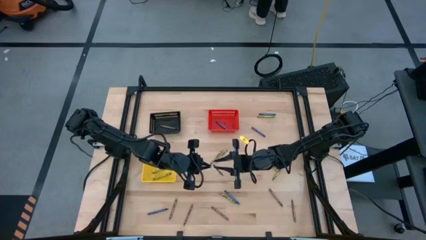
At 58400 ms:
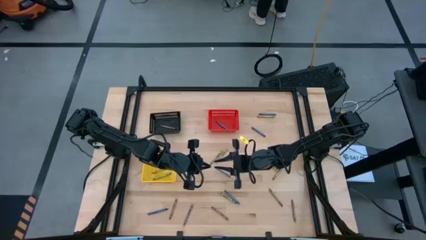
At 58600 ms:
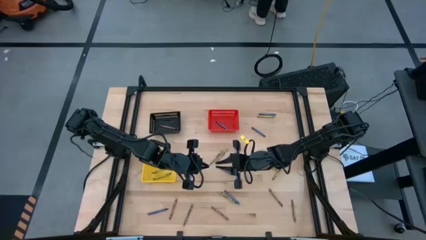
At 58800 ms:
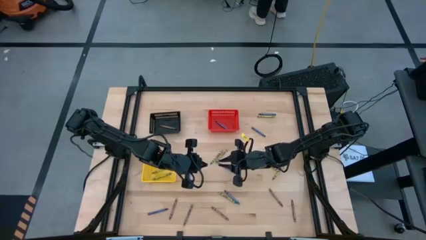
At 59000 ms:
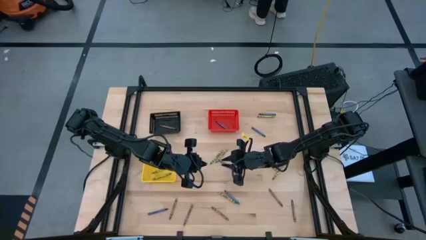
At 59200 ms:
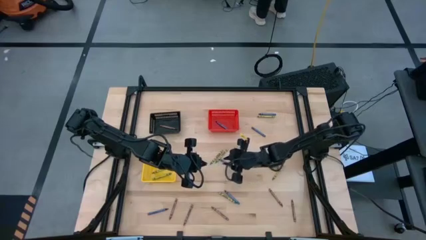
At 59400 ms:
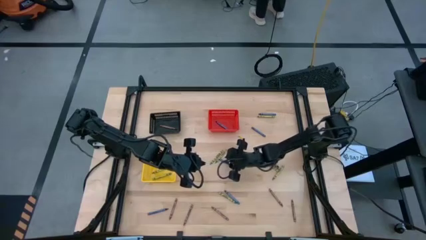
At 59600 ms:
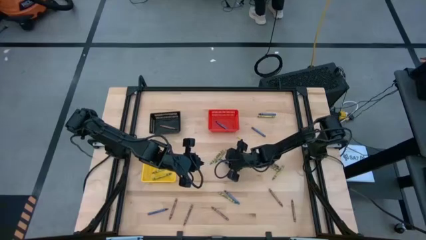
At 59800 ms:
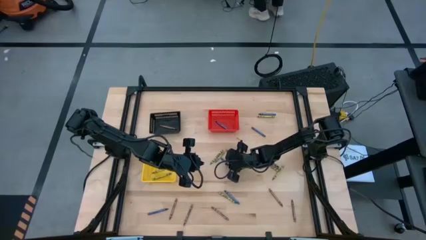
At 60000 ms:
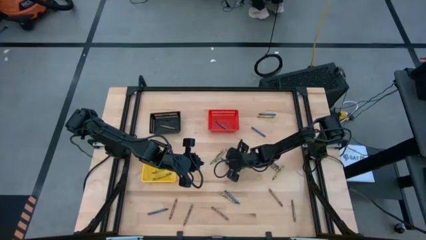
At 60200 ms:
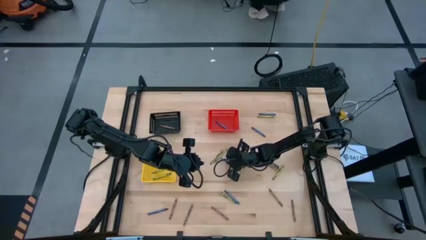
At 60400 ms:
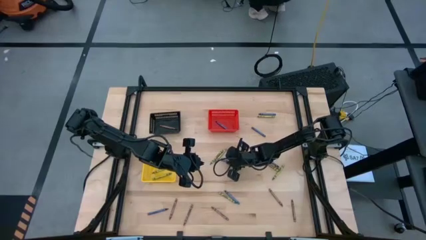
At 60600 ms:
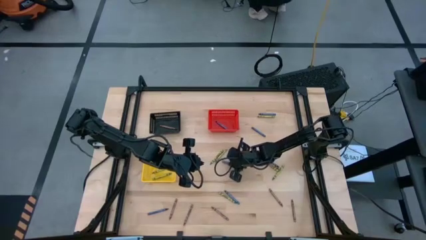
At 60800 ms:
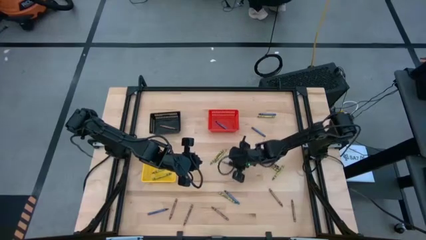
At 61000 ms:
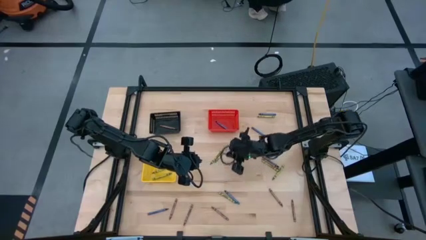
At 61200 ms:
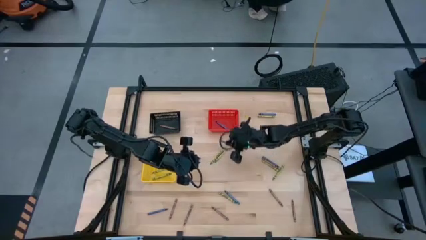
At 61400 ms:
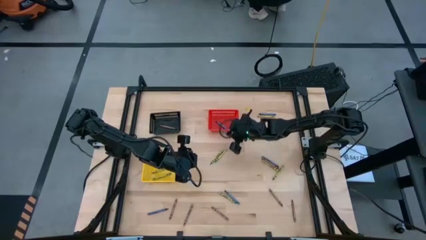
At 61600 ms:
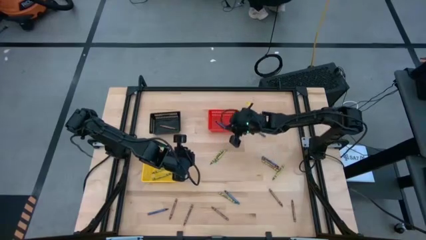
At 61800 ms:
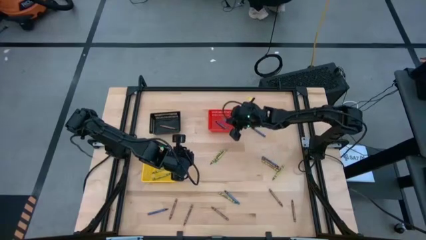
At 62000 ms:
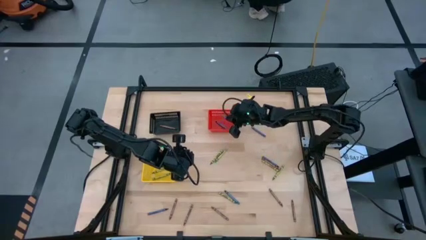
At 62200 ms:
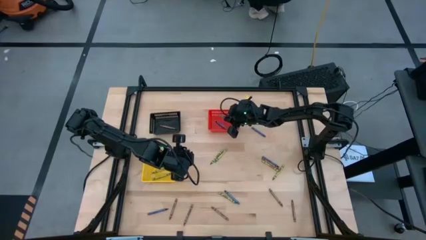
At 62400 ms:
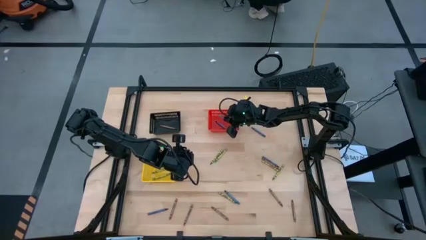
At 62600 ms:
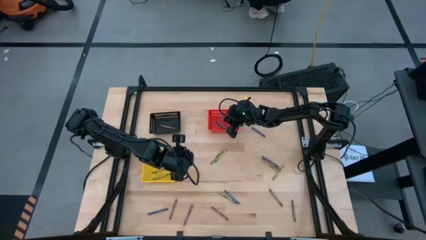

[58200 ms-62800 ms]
Task: Sort crayons
Put the blue crayon into the red bin

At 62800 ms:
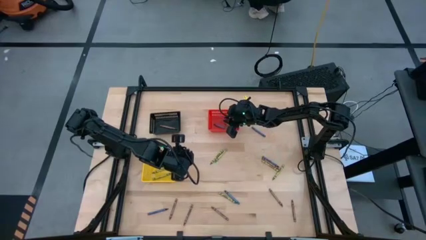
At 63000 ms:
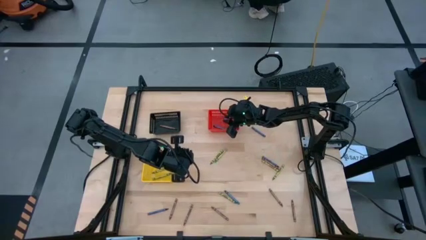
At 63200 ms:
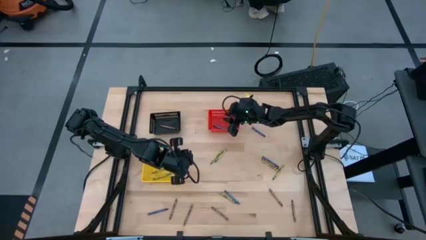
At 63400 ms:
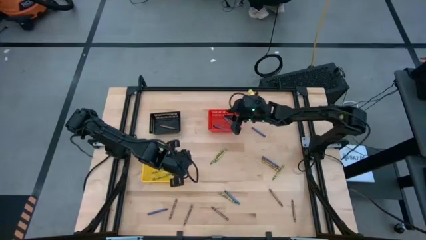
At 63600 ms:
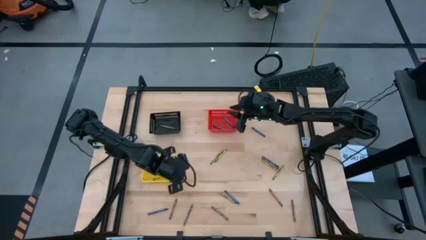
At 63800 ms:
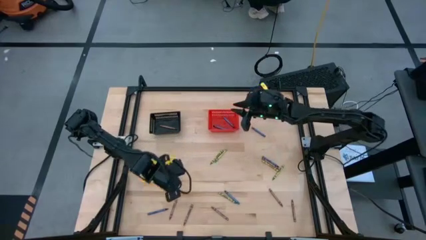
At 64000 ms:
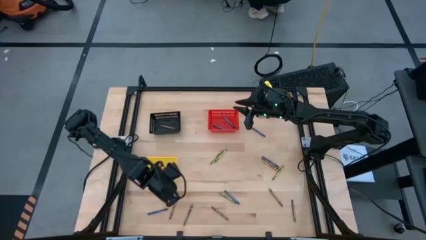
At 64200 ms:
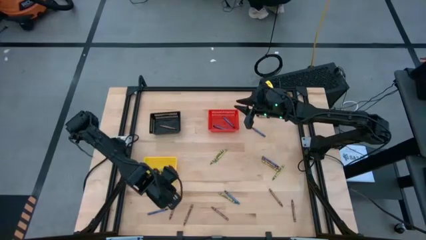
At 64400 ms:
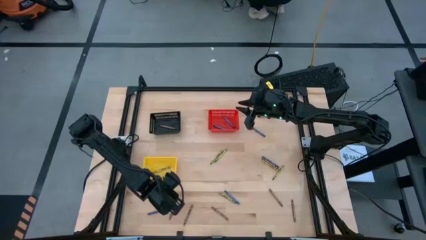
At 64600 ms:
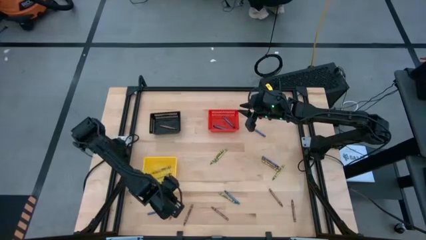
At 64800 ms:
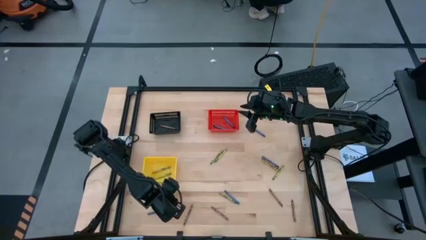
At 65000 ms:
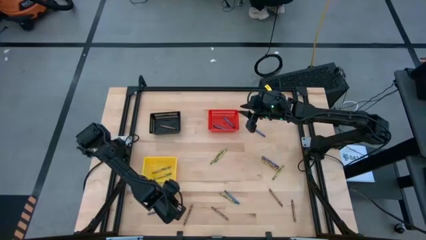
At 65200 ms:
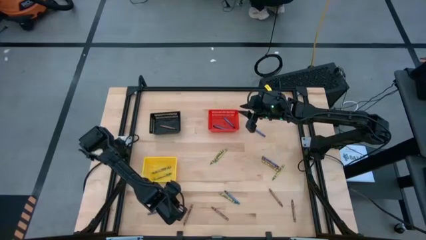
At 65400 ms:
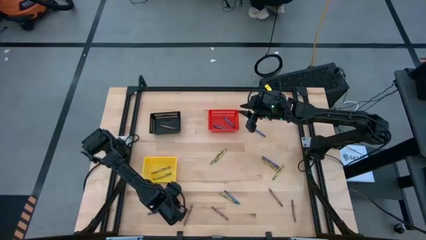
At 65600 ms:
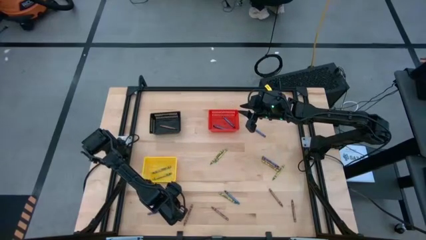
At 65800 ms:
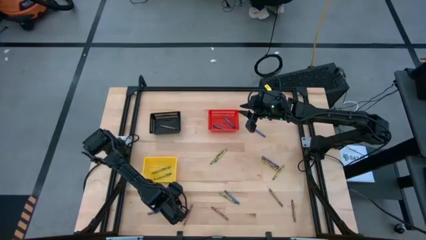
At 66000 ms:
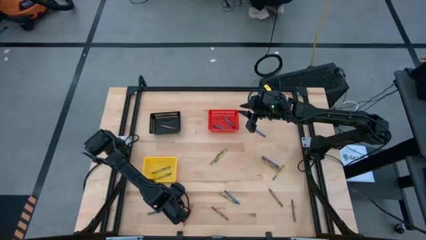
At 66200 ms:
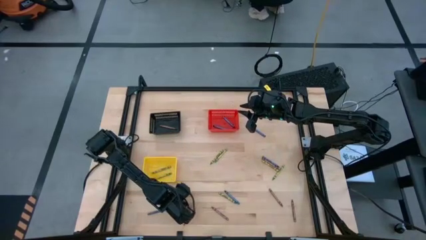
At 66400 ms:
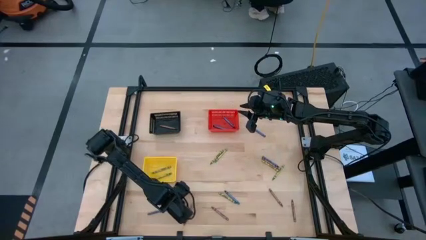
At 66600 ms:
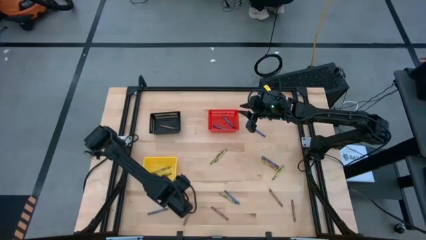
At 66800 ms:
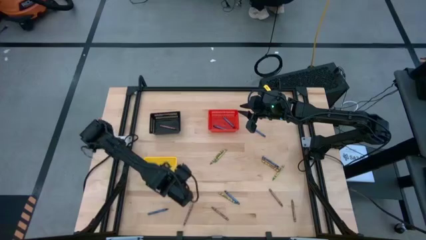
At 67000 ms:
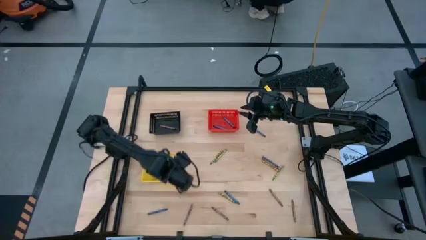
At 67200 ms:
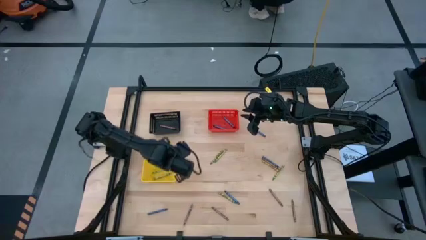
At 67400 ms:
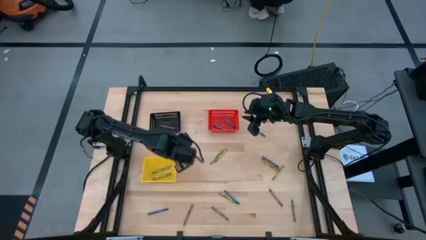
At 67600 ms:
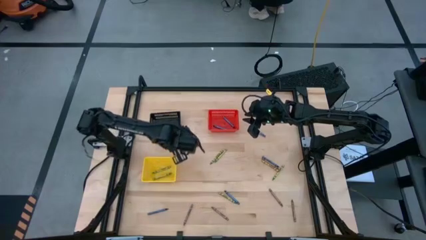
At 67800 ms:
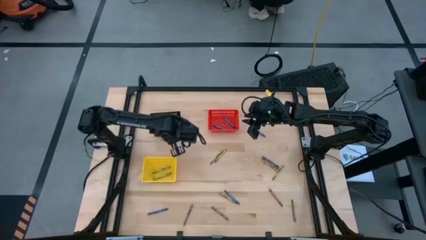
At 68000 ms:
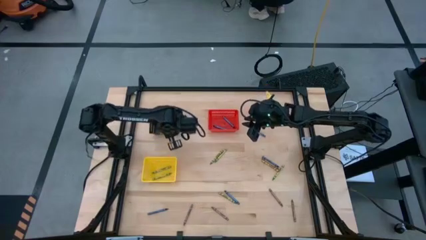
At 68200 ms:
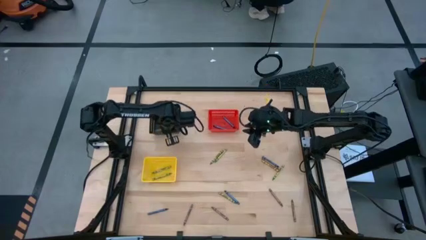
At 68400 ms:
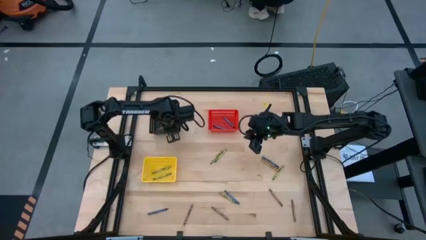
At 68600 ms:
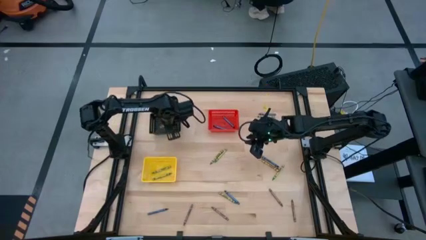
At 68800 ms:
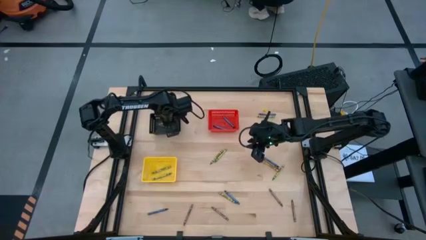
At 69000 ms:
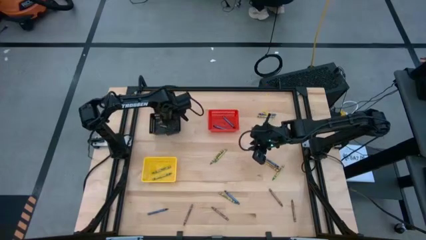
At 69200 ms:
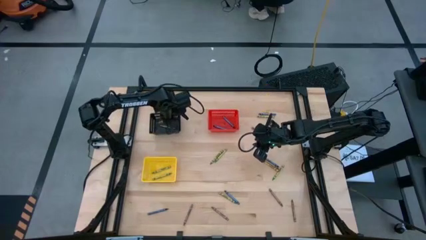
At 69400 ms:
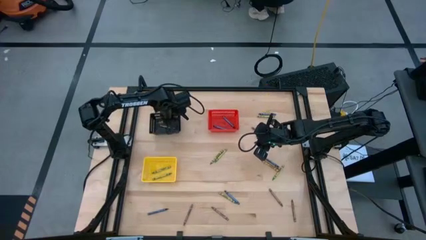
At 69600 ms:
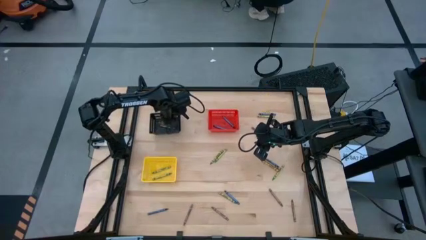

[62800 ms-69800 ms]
Put the brown crayon into the black bin

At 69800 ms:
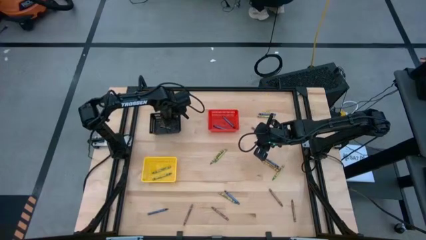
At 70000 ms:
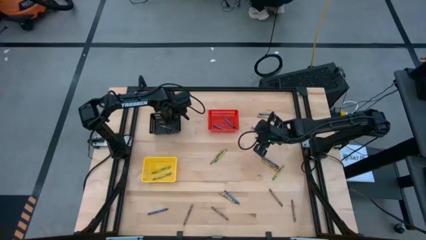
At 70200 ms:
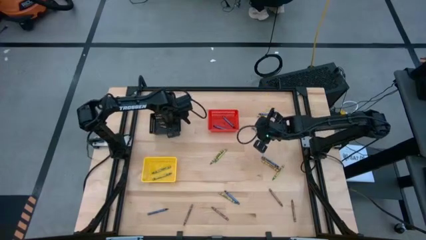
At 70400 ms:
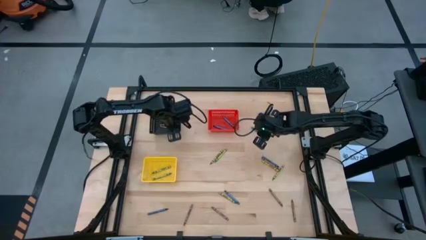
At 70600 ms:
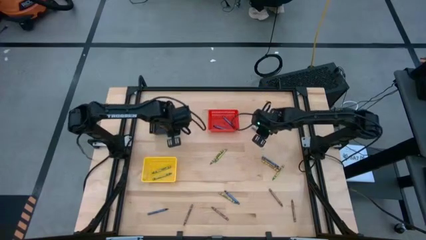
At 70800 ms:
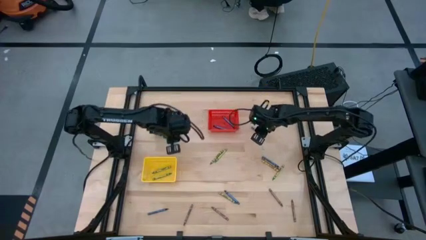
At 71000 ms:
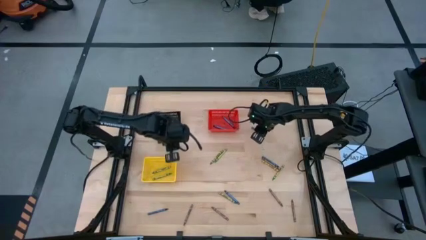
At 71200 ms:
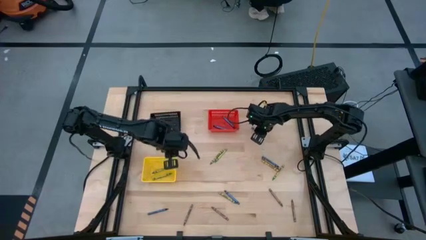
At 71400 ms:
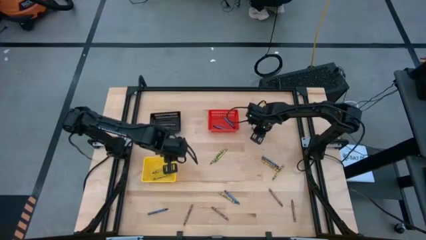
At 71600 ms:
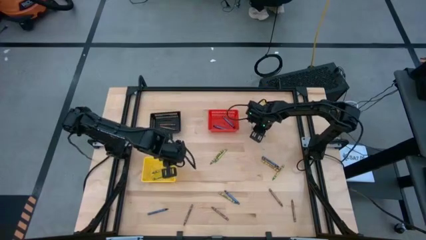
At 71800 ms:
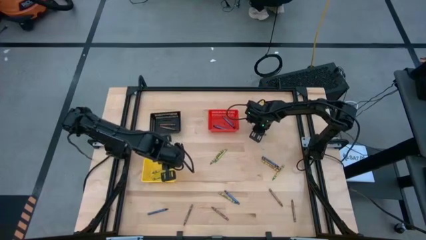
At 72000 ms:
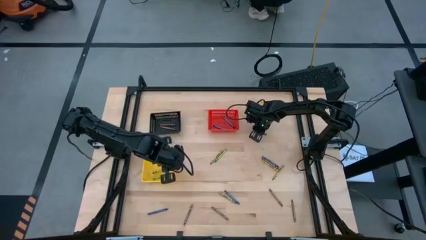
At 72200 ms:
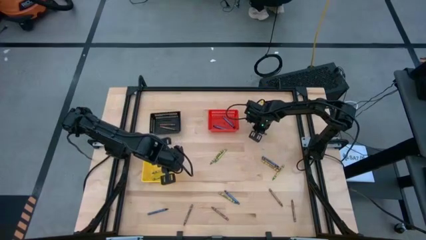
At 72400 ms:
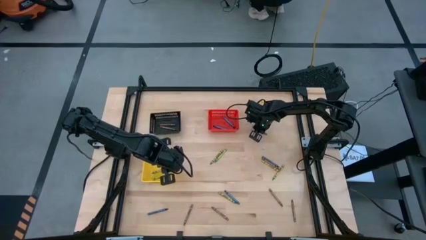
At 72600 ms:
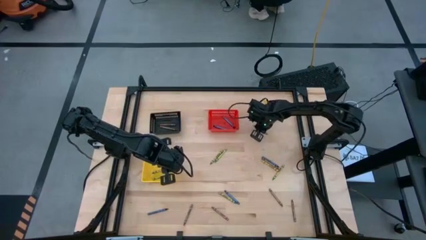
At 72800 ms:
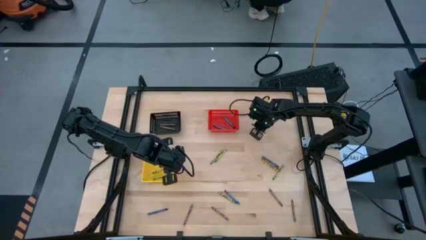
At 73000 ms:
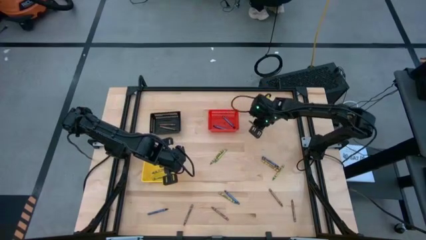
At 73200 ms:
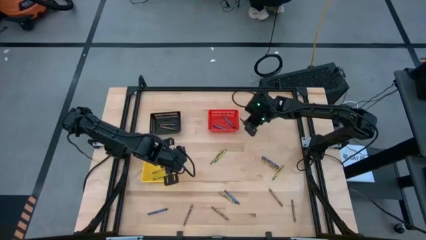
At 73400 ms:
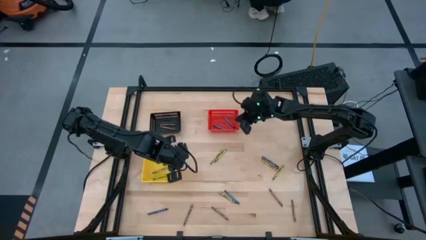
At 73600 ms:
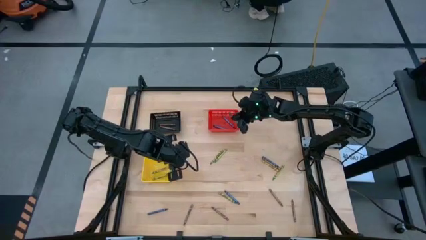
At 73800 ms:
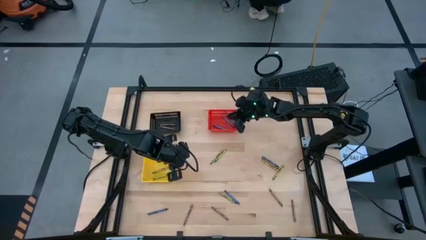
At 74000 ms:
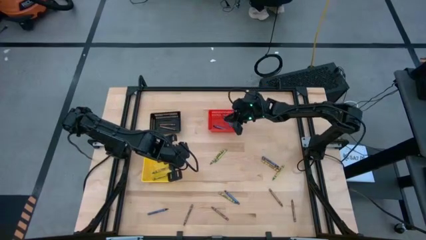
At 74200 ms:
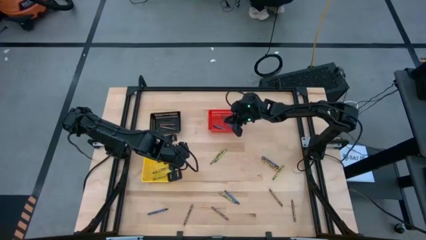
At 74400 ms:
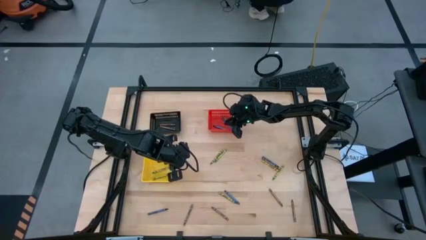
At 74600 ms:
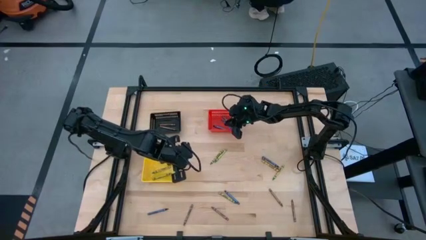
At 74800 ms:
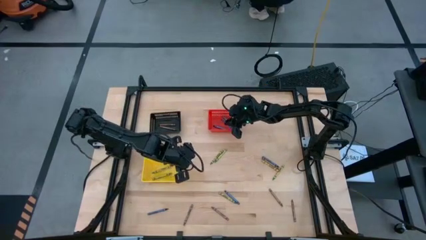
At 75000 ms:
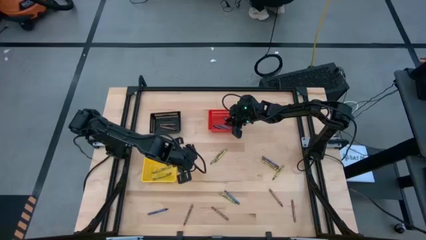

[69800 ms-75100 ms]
Put the blue crayon into the red bin
